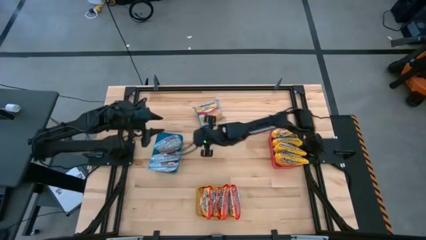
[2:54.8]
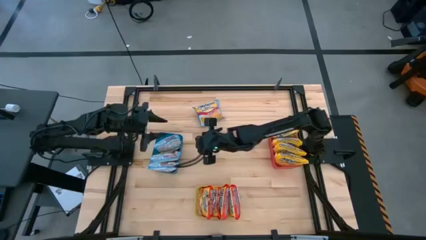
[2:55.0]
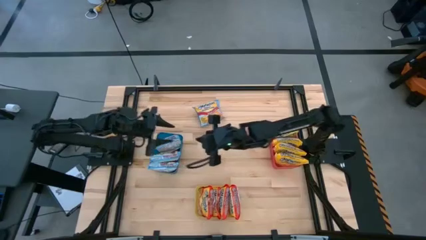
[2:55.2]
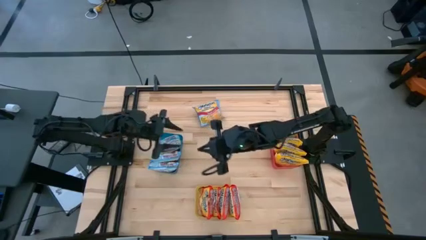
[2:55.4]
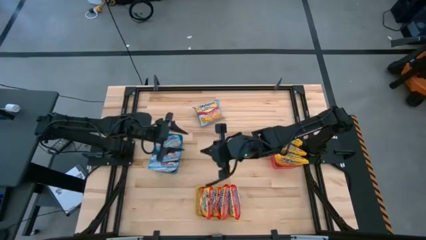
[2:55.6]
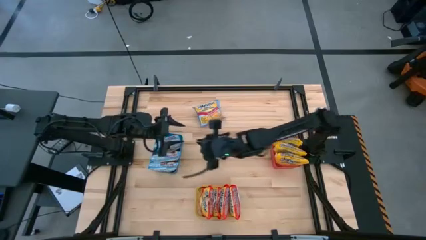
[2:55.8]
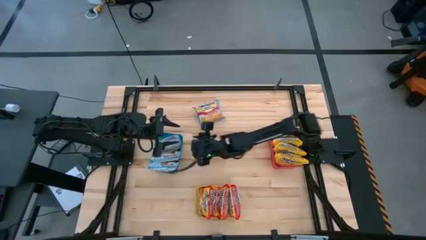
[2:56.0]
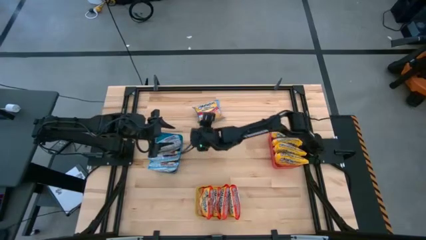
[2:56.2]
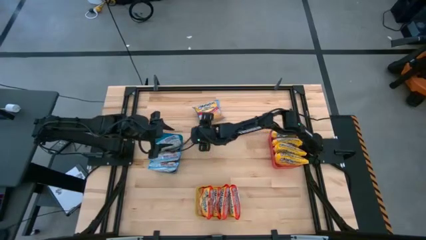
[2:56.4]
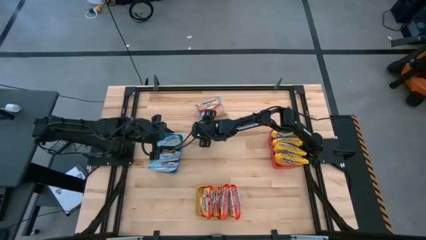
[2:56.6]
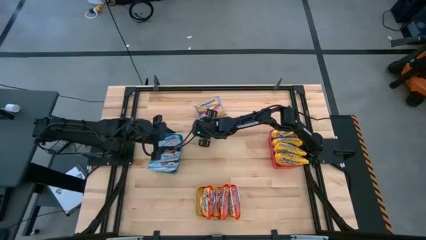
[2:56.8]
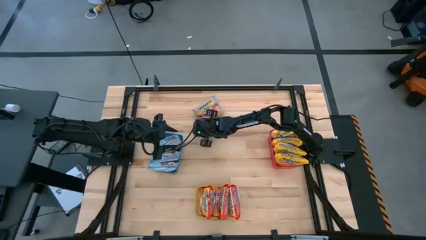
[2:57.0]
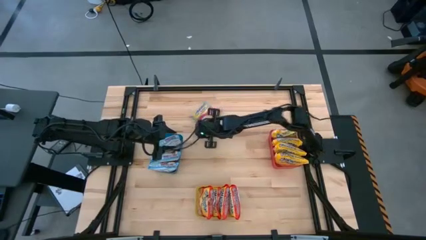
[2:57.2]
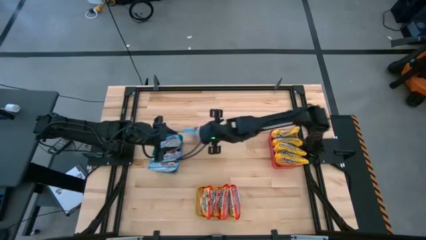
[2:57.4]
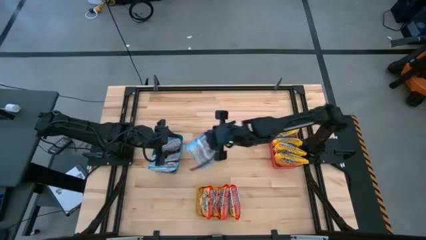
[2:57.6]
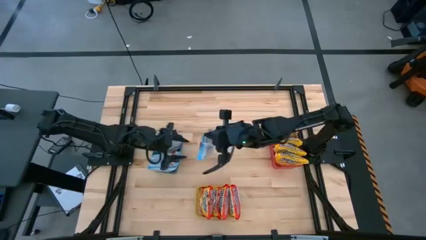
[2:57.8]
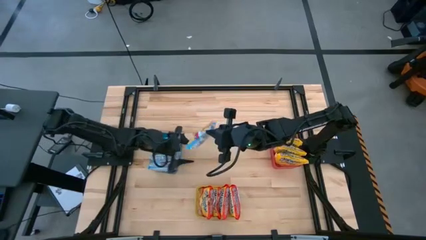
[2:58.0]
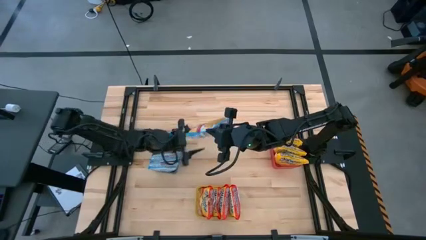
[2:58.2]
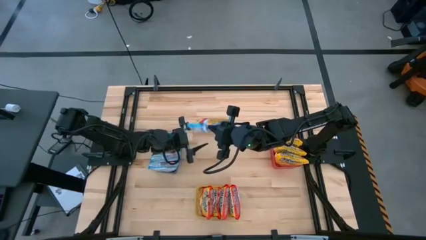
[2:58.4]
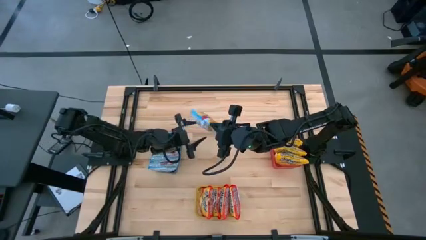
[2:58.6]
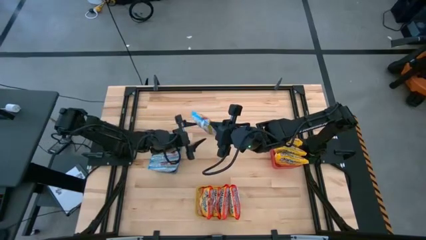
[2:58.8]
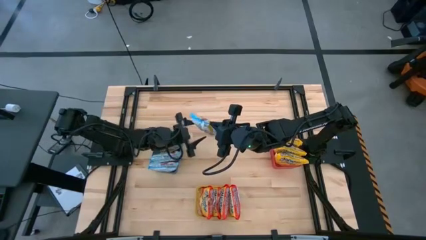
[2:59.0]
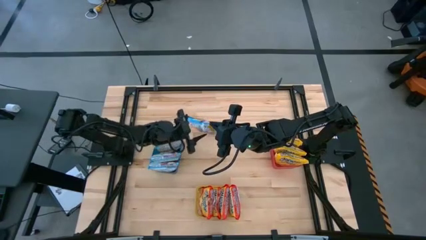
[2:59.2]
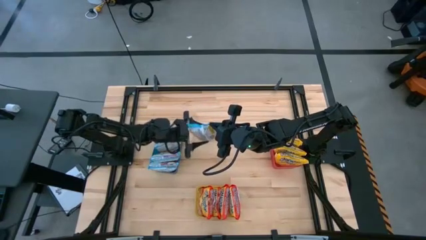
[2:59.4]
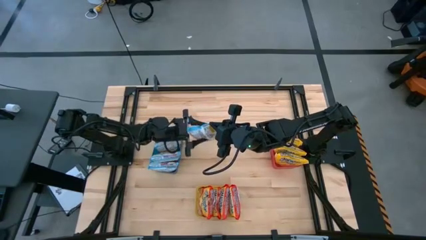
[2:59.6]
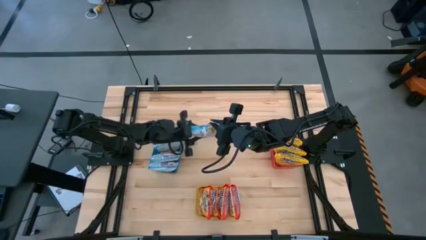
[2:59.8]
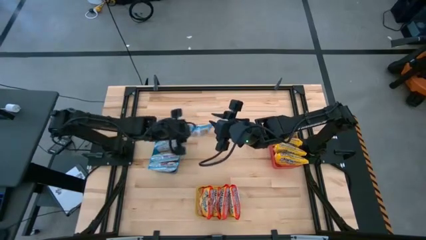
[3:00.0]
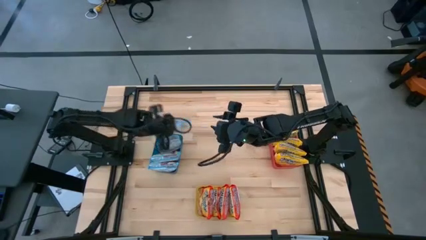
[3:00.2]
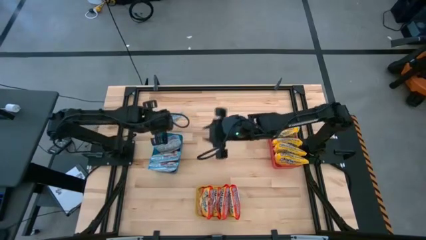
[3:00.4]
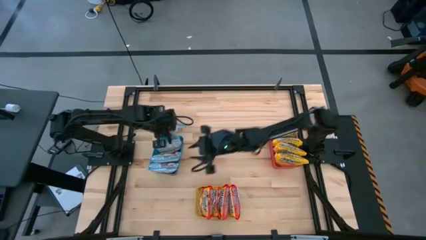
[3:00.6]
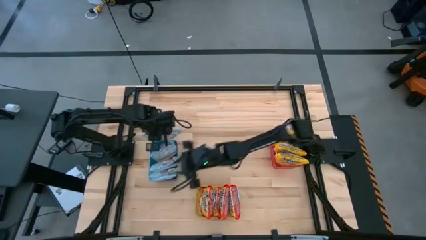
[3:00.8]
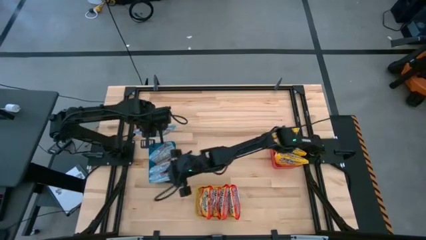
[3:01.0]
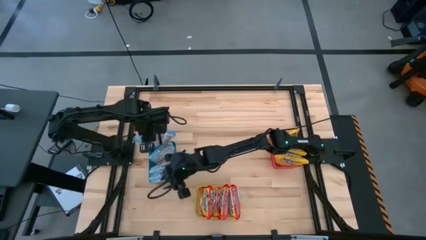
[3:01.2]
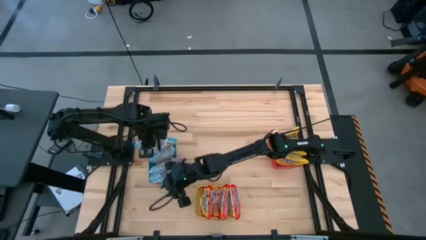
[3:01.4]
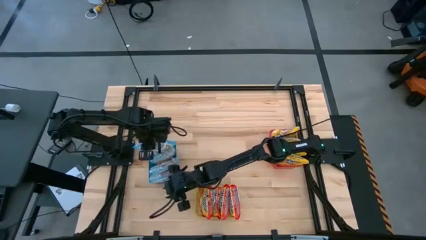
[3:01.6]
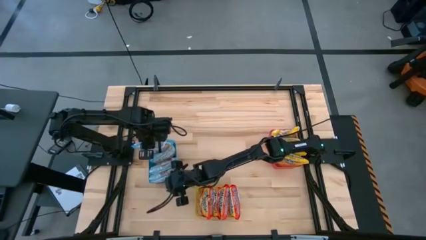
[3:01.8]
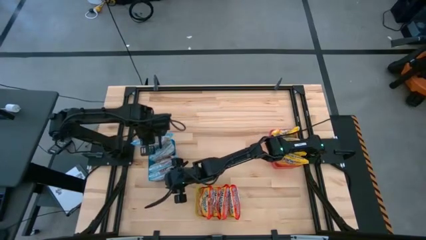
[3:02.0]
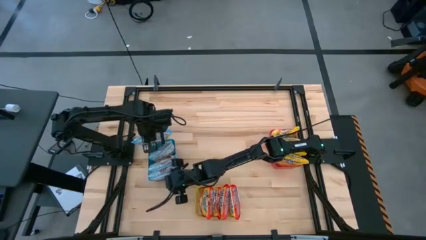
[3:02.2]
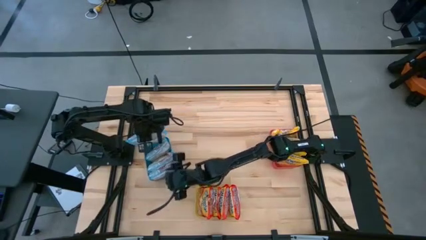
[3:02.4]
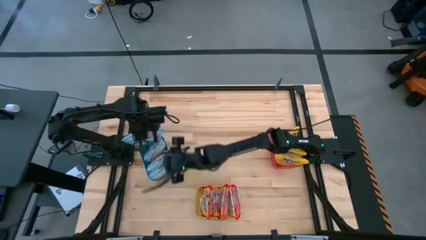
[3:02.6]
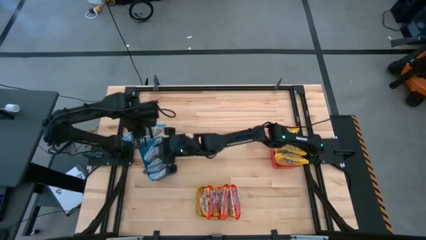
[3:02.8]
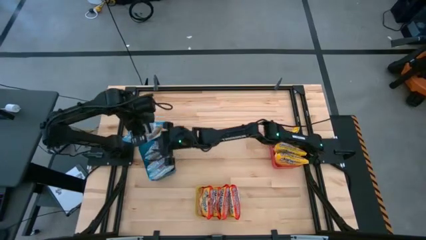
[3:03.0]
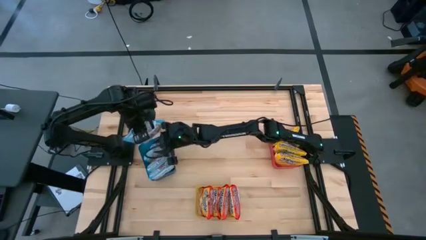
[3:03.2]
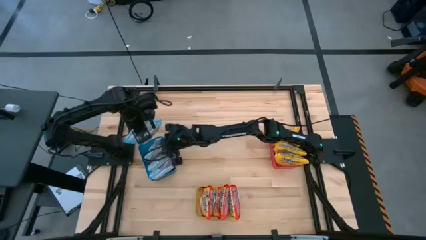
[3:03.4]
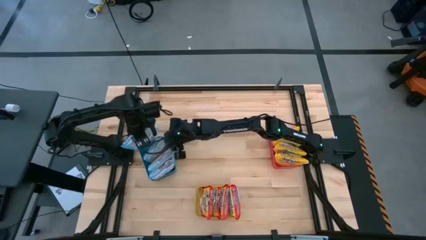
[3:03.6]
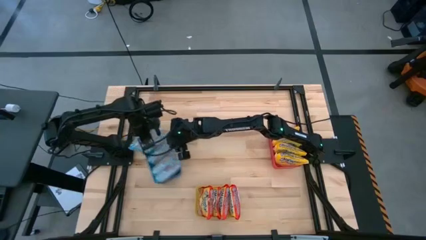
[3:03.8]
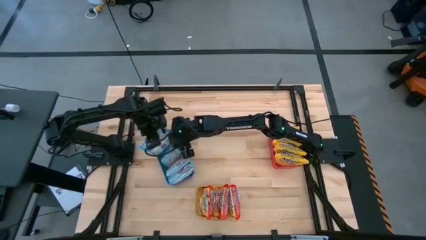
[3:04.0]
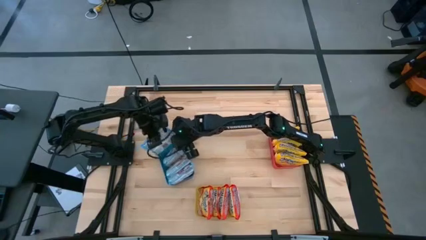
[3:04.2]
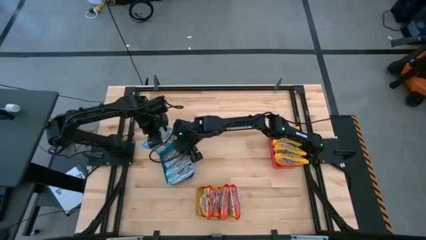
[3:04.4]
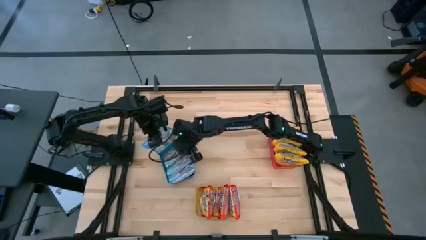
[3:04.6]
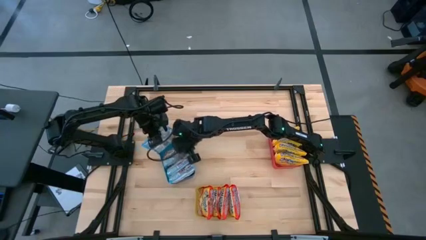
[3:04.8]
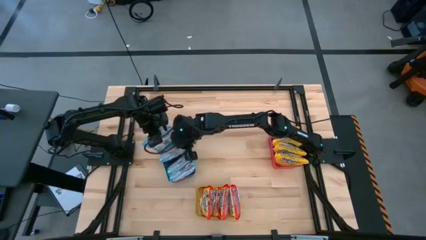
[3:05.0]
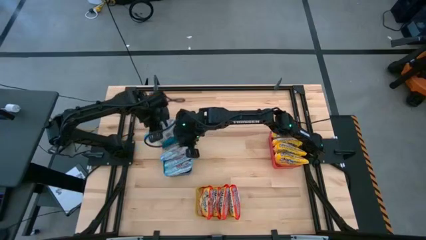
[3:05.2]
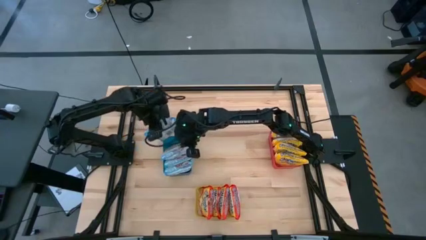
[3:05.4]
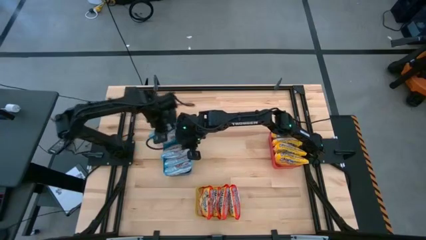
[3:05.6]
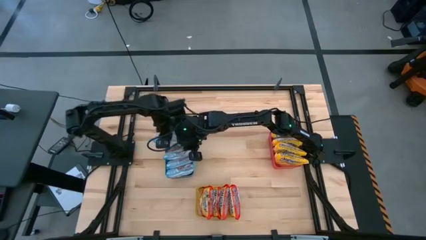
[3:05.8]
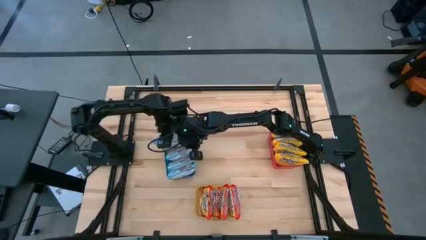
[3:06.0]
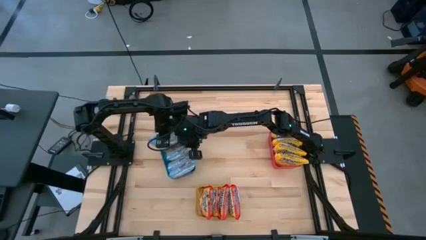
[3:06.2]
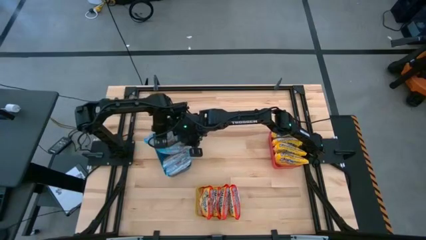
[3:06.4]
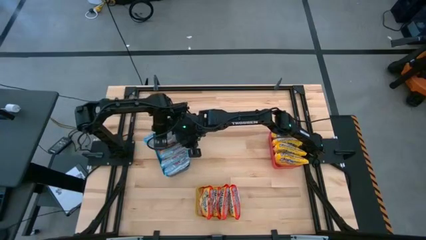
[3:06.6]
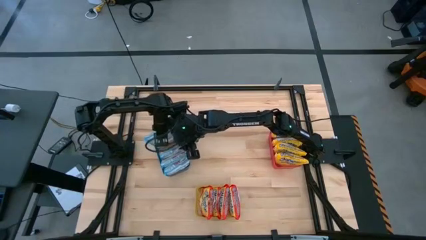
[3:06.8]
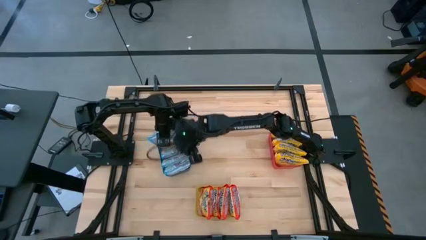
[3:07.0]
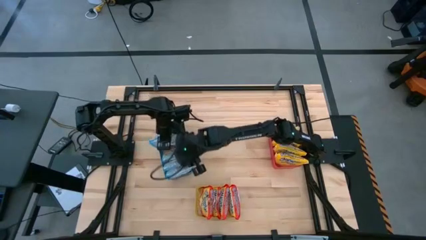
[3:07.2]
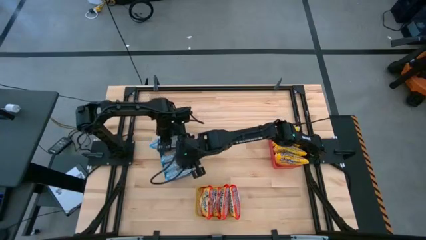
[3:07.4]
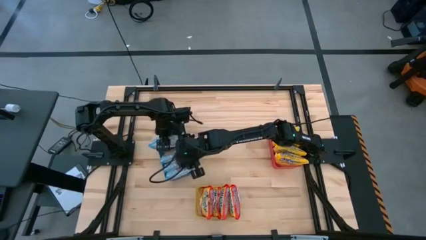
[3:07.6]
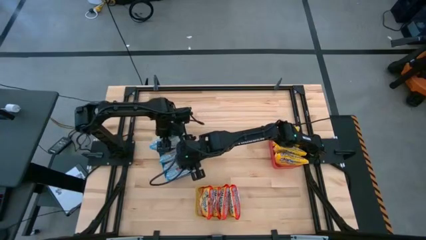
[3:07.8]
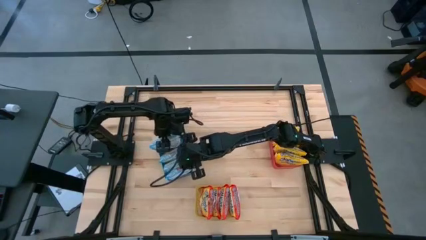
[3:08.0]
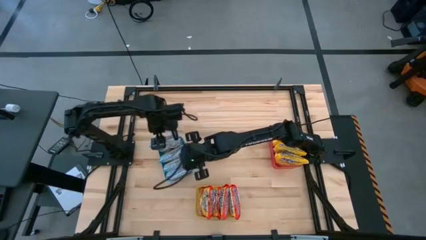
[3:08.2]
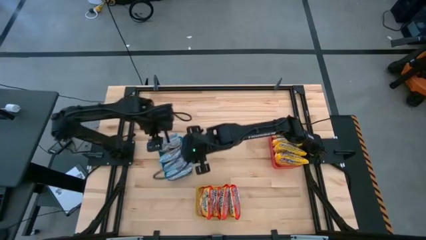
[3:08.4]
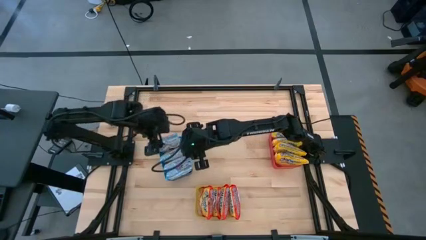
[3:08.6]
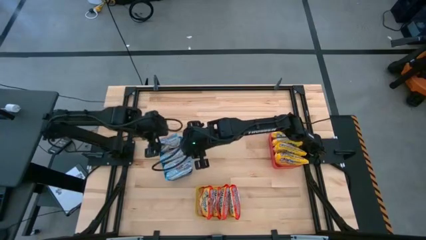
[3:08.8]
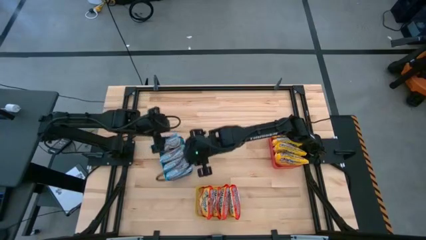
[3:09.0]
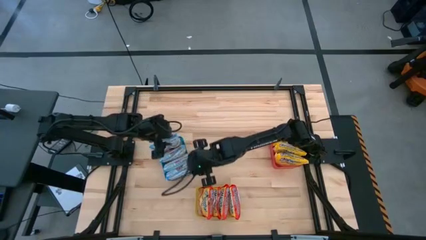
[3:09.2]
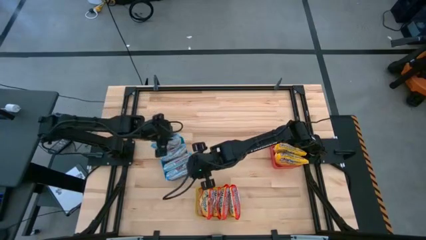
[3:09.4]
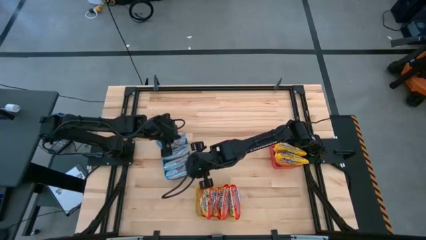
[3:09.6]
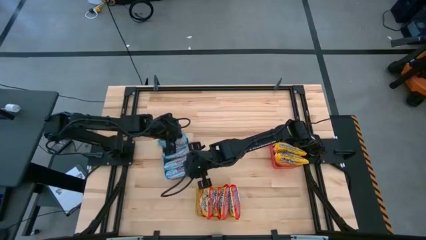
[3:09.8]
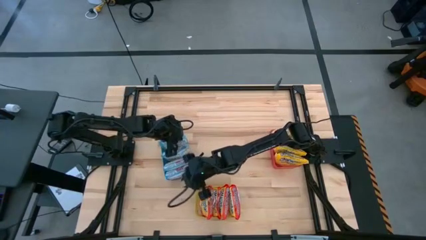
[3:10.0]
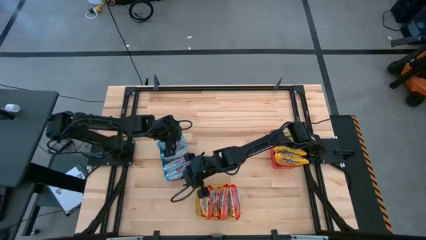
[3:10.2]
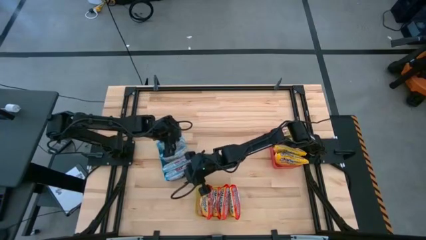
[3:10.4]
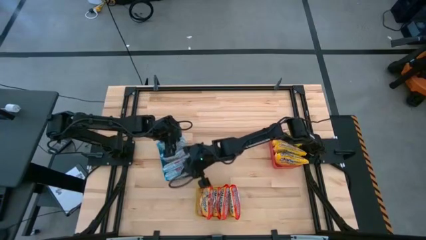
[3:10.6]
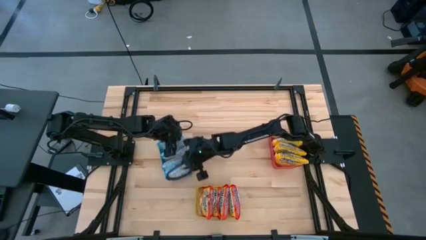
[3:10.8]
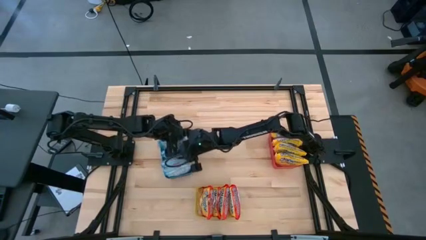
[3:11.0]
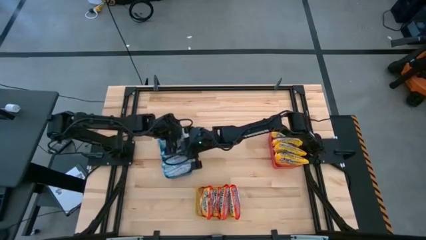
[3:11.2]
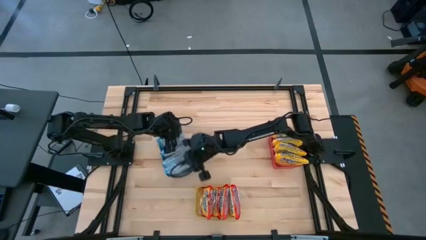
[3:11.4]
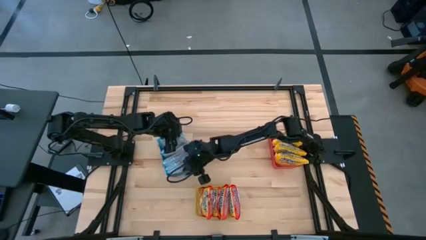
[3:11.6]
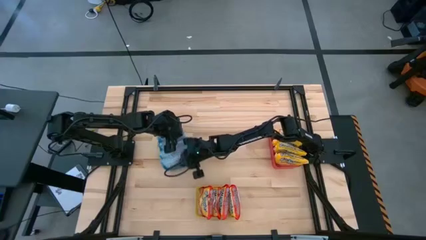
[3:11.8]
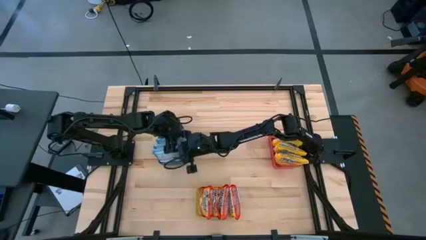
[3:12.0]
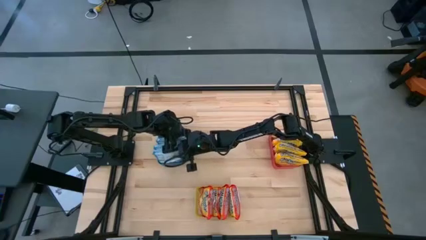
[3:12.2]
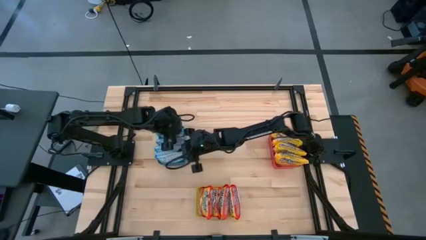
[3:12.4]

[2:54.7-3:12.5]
Task: Sort Maruchan noodles
Put the blue noodle pack into the blue bin
